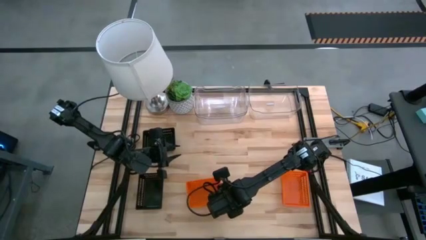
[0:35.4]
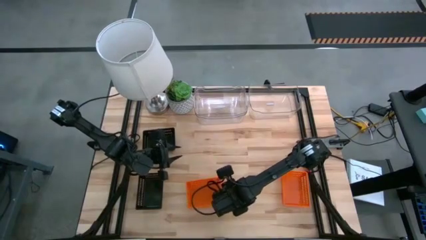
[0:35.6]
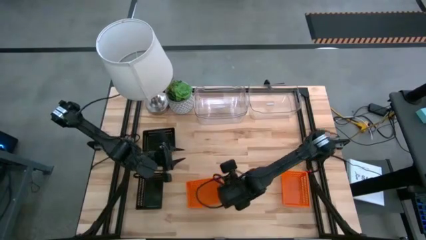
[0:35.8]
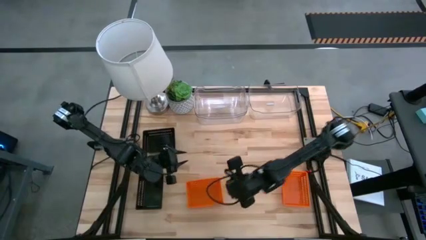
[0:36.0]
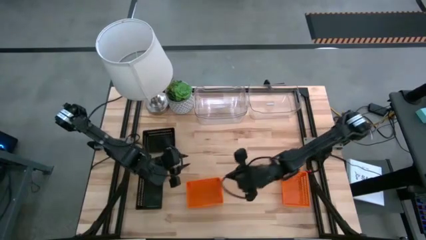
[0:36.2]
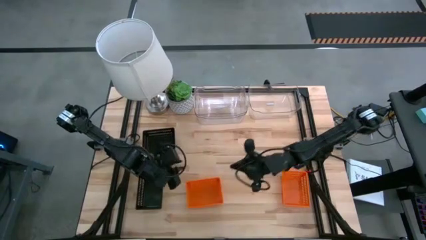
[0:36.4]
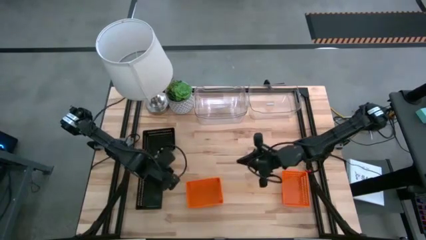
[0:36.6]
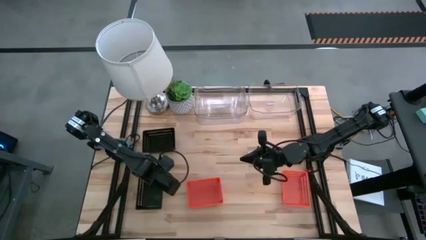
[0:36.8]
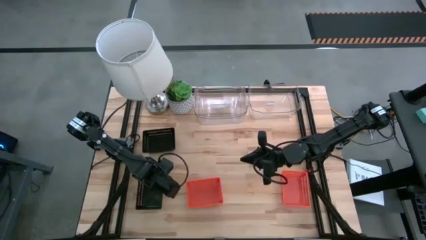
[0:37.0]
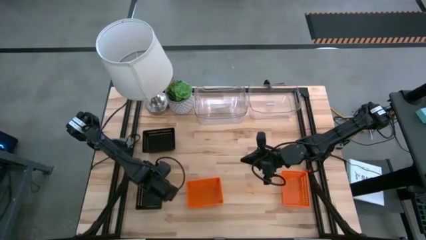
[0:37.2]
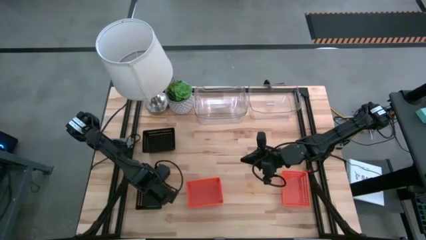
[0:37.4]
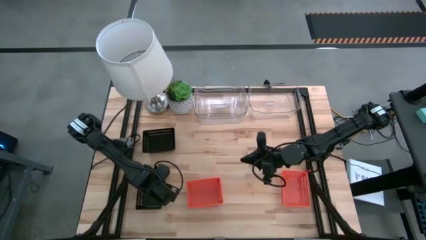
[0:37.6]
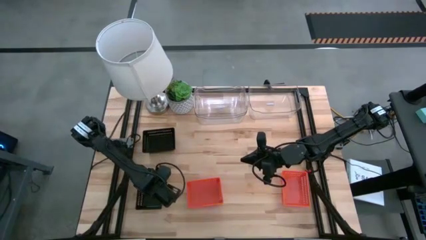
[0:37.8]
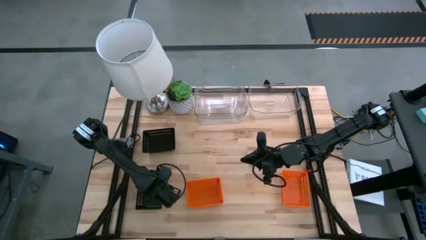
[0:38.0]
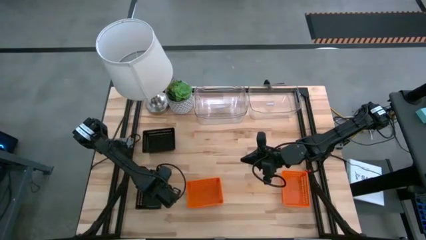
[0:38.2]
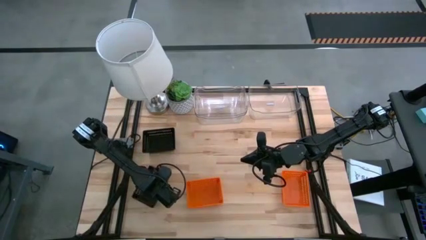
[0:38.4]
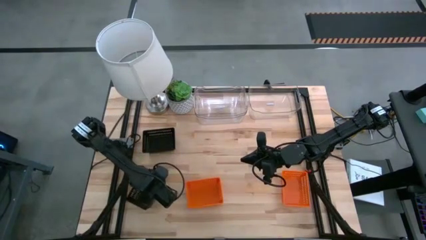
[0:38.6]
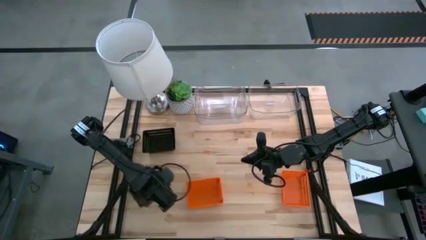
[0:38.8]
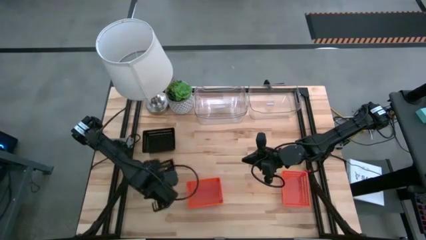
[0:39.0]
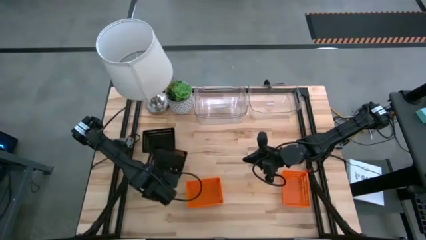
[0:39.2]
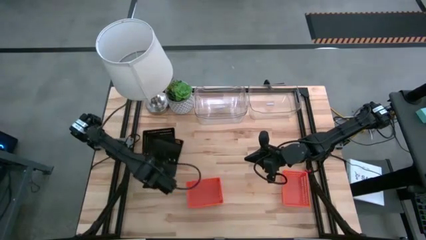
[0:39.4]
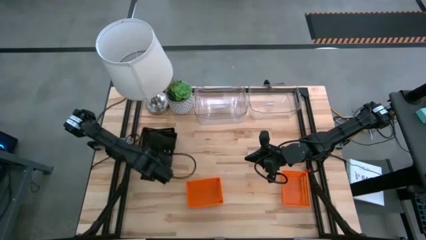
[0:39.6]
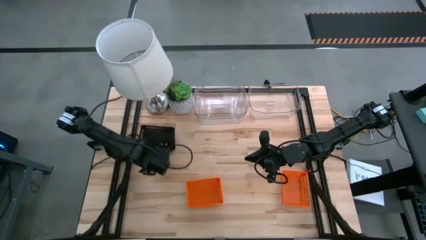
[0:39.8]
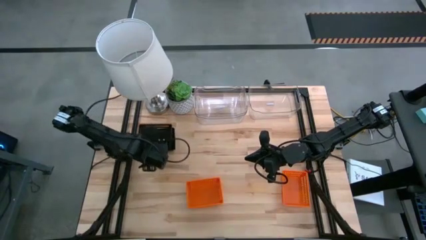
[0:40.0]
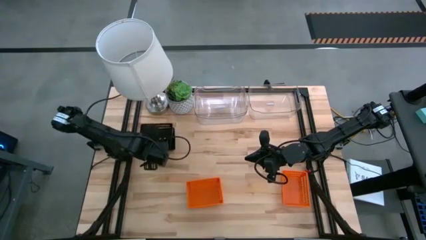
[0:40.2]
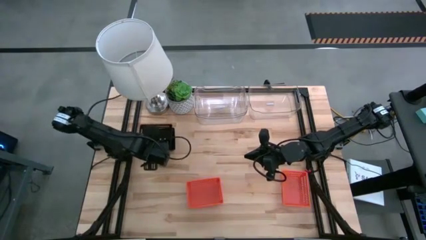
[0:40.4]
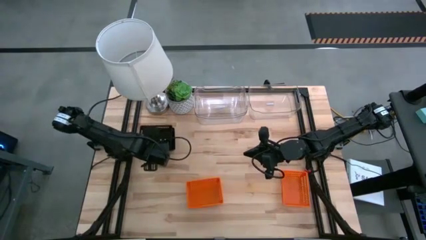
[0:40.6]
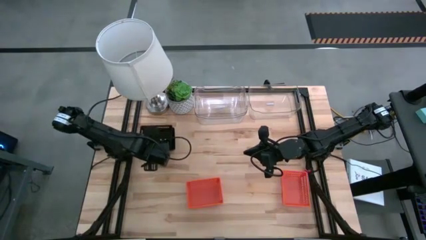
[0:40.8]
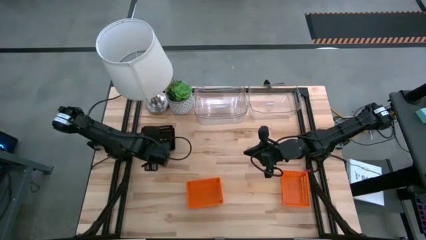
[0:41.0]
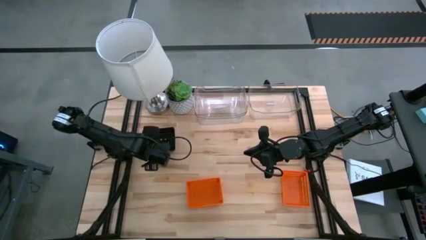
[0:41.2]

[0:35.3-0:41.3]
Stack the black bin on the stacked black bins

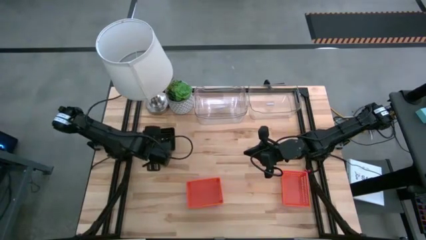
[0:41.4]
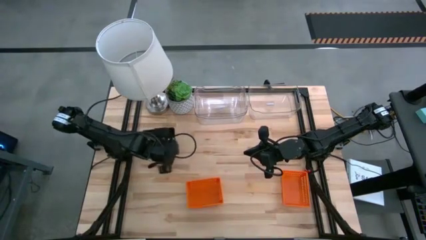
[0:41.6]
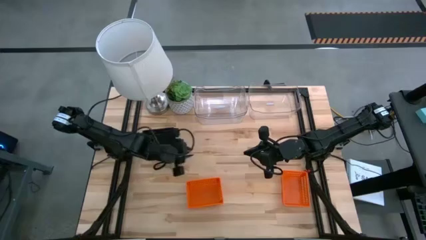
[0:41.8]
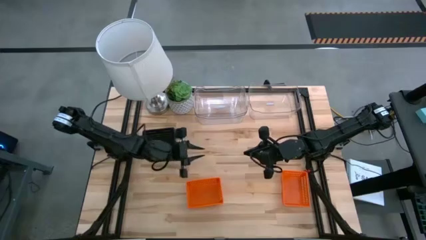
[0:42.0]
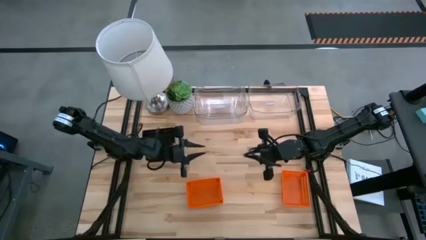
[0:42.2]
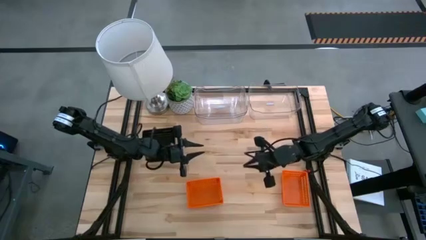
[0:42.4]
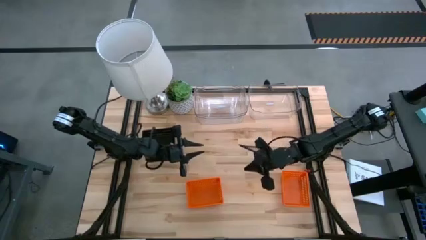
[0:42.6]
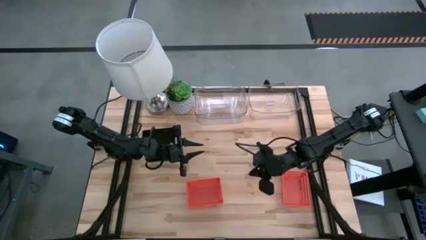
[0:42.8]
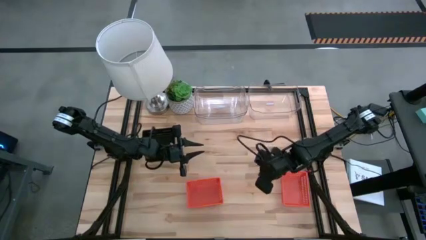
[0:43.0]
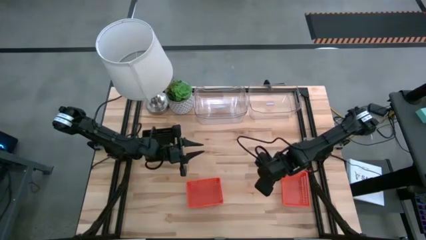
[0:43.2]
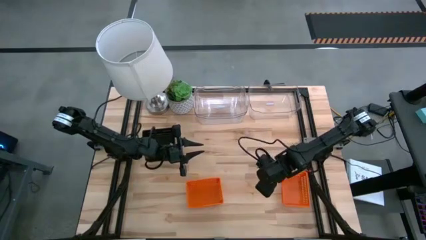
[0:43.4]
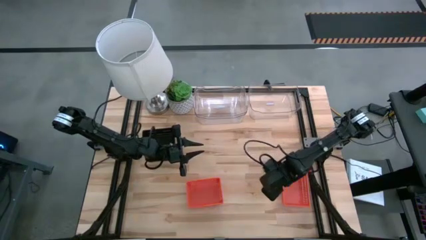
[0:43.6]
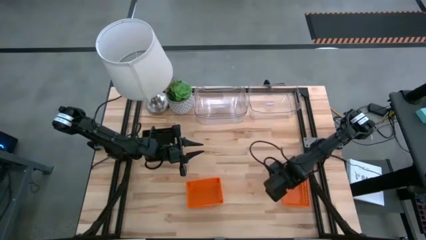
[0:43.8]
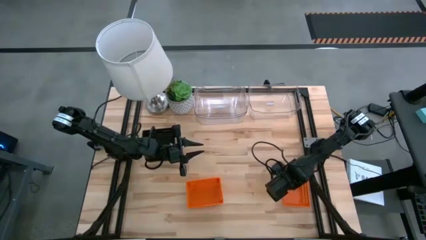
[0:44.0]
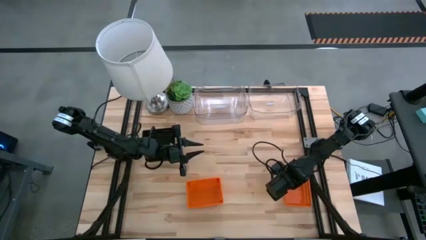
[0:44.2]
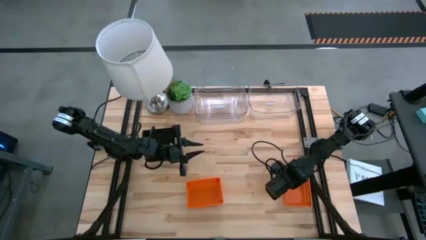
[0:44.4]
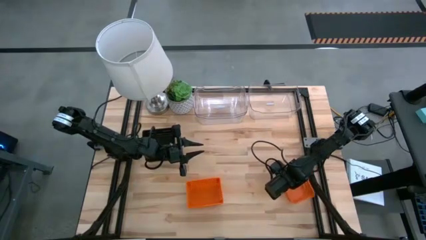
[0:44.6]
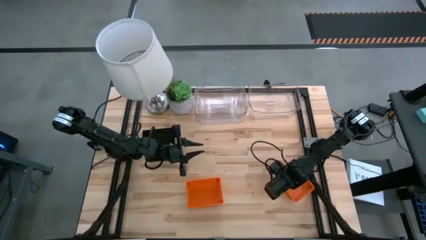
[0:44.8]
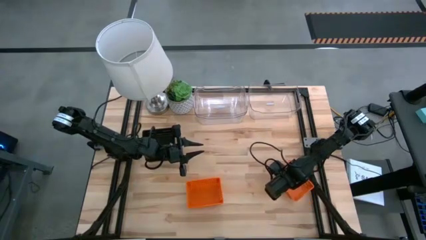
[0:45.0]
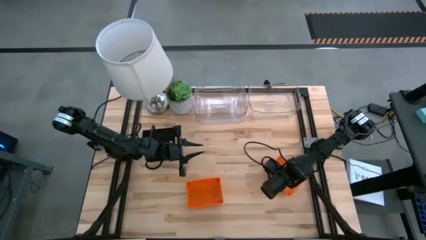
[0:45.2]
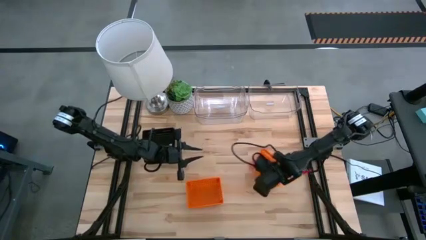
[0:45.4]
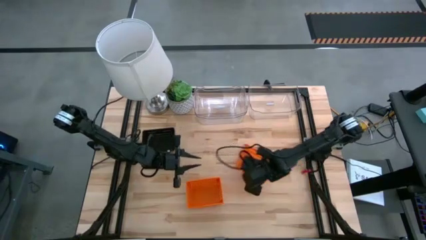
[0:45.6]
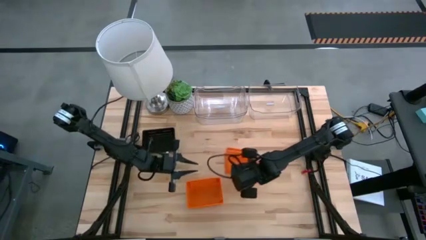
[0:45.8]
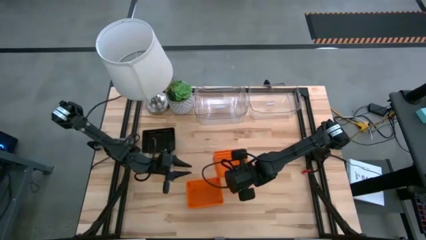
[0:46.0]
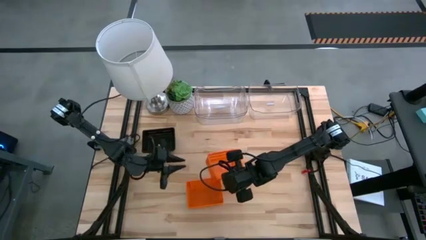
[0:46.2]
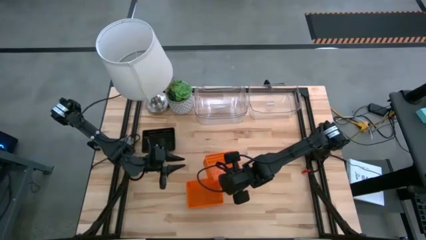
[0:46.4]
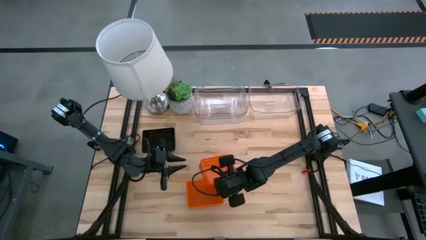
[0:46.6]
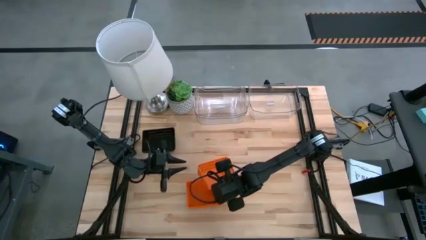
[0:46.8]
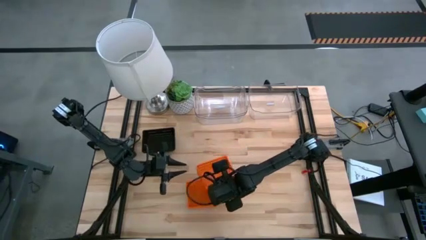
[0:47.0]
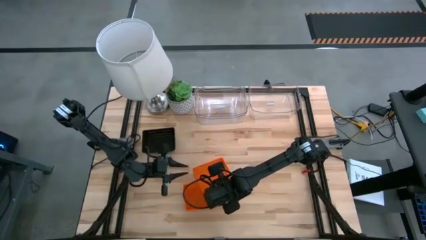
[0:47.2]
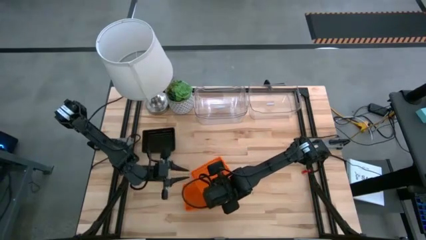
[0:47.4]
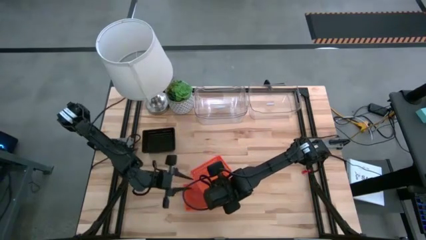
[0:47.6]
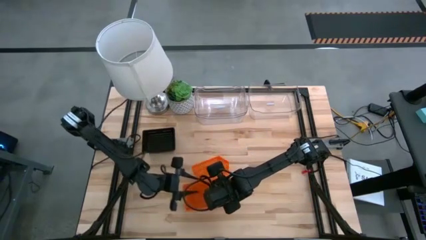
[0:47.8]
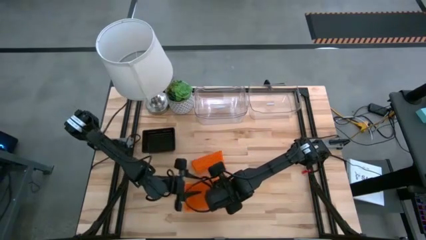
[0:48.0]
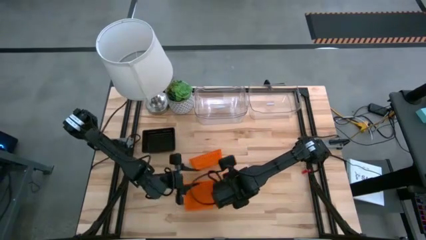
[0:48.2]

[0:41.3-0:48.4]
Stack the orange bin on the stacked orange bins

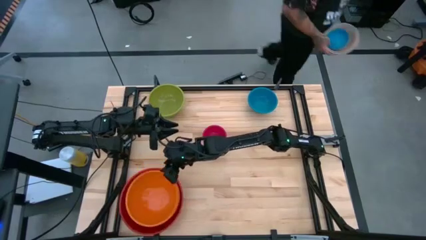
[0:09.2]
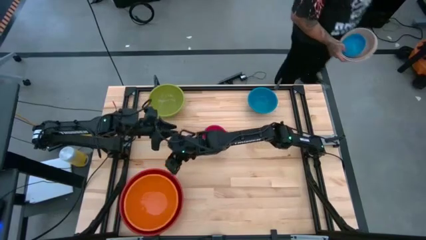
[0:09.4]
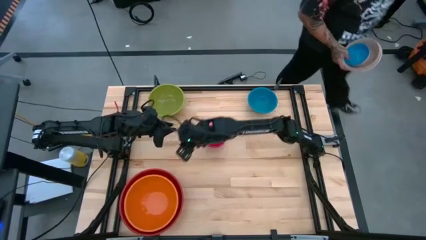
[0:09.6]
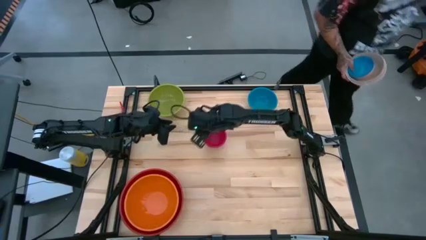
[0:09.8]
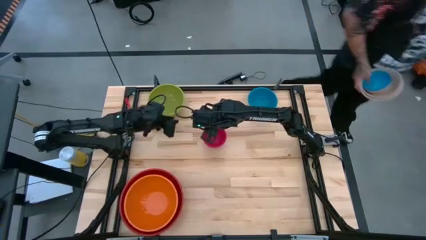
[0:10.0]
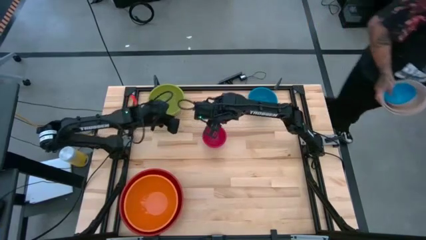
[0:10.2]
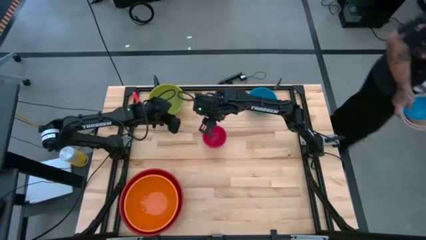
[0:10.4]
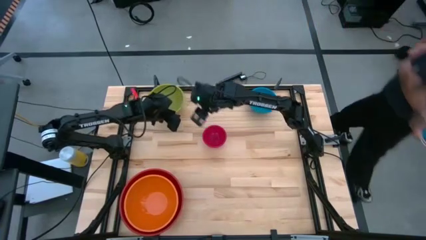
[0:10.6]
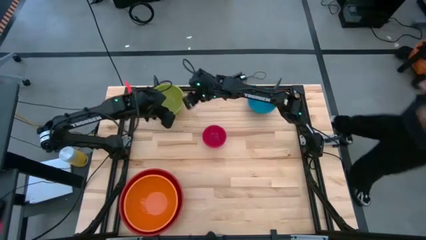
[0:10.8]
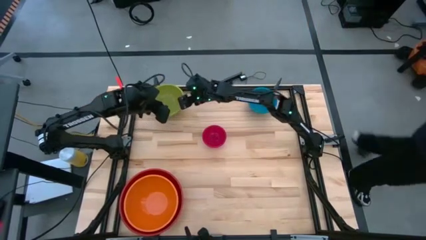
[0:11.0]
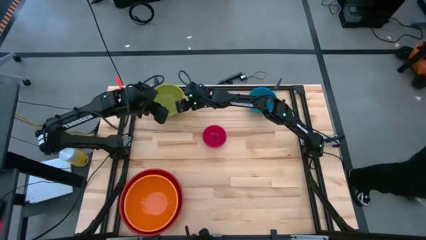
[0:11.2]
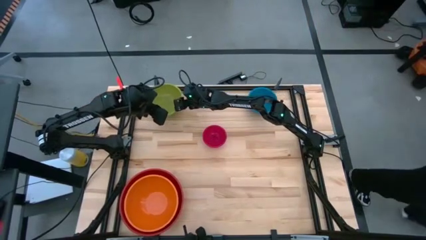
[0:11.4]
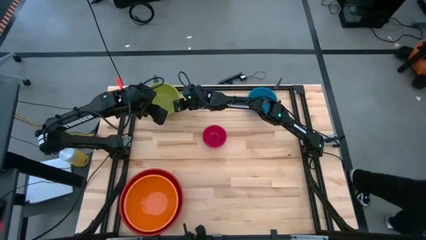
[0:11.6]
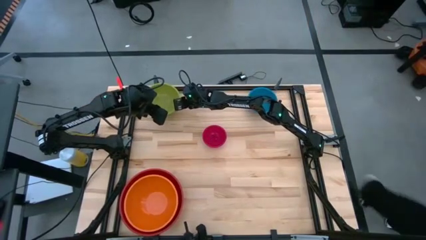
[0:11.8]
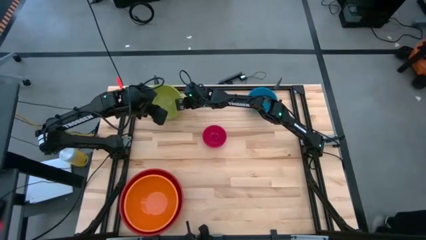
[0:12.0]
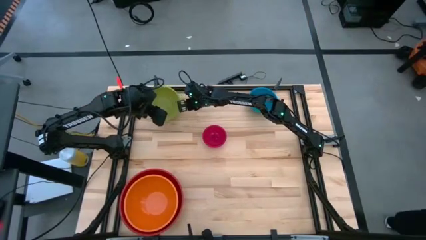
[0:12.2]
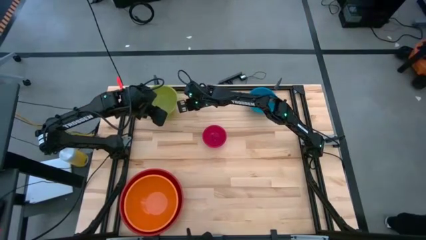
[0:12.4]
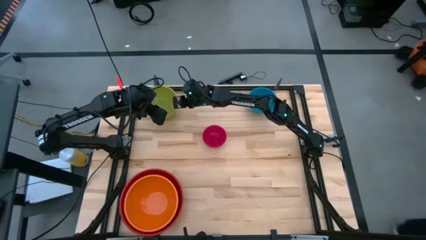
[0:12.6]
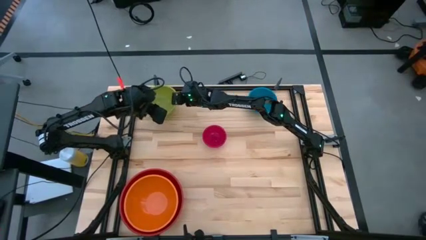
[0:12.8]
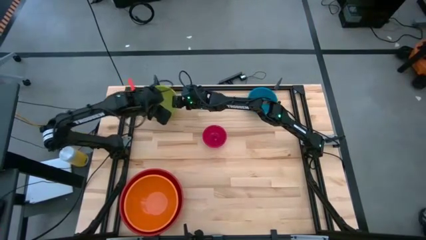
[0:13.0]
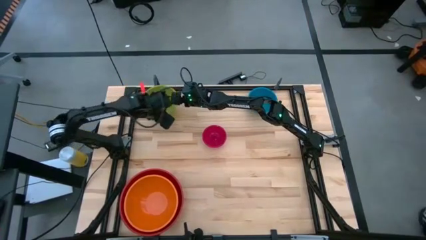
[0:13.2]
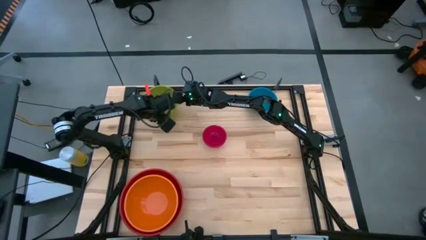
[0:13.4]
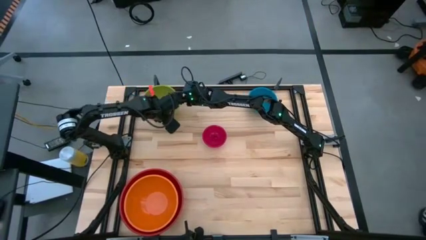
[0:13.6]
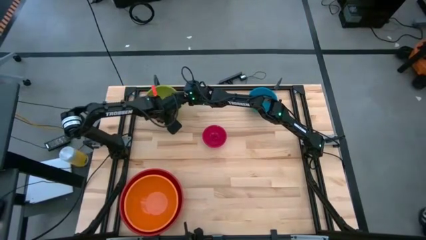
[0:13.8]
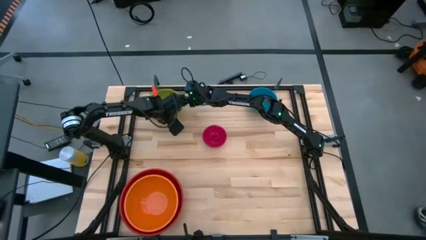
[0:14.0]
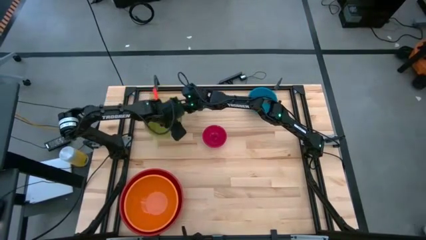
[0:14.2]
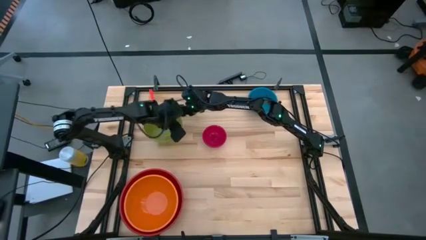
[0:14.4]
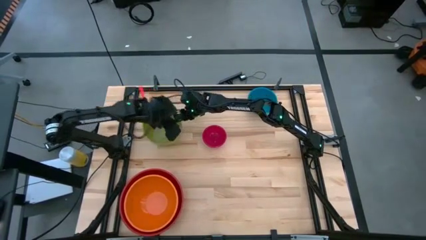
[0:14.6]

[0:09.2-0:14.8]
Stack the green bowl on top of the orange bowl
